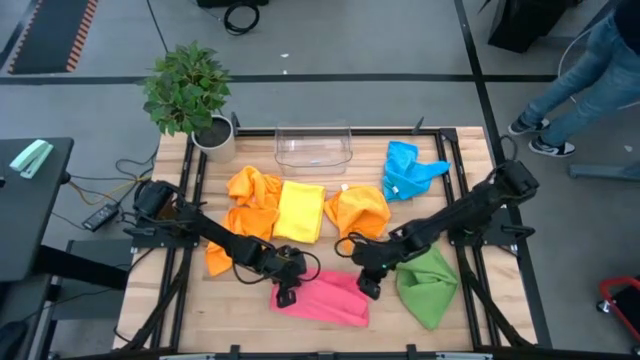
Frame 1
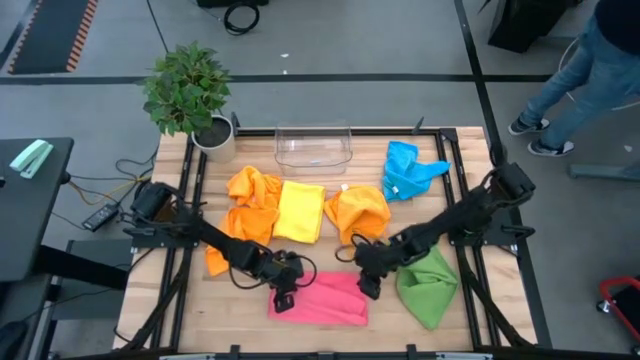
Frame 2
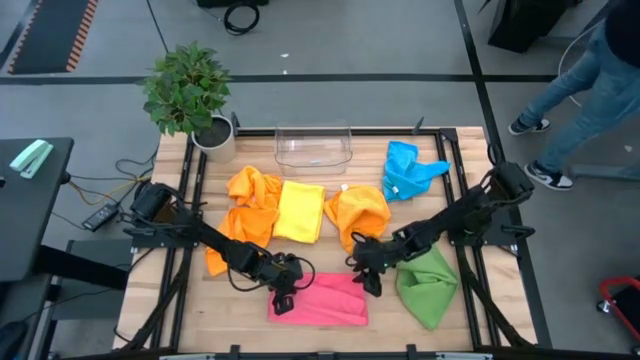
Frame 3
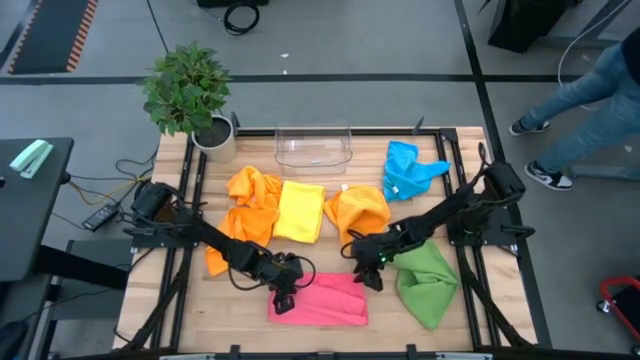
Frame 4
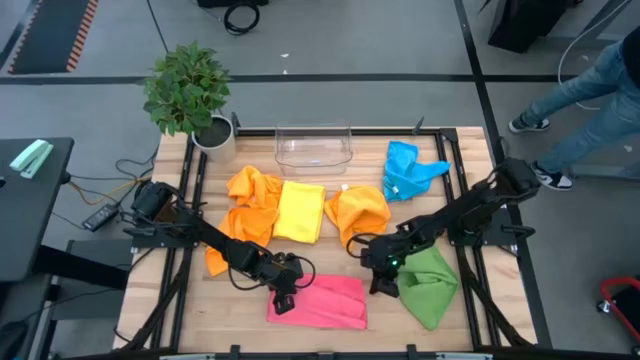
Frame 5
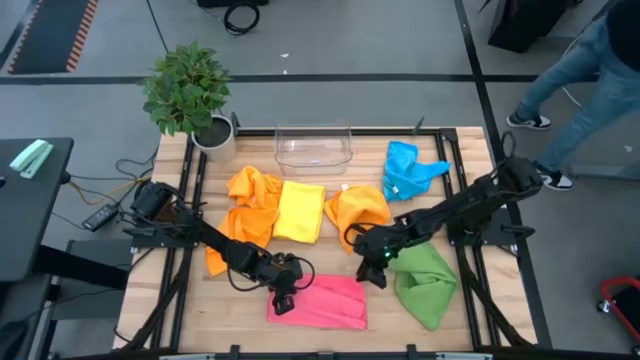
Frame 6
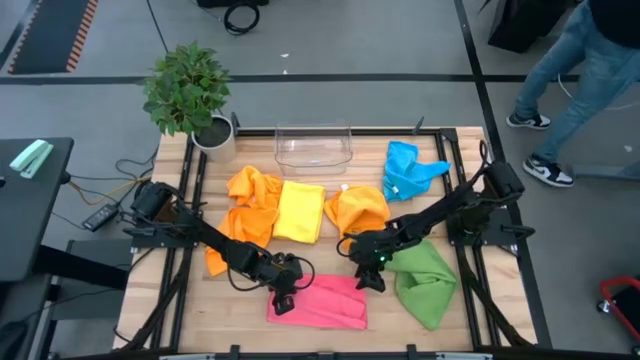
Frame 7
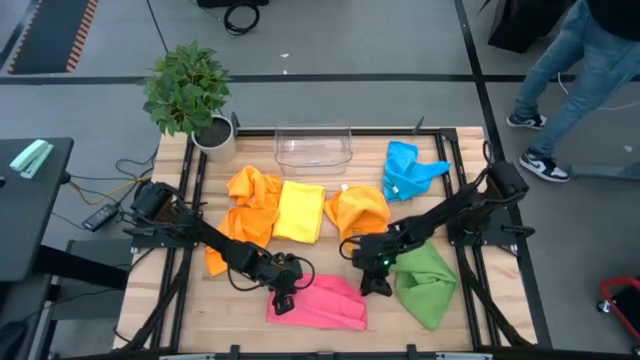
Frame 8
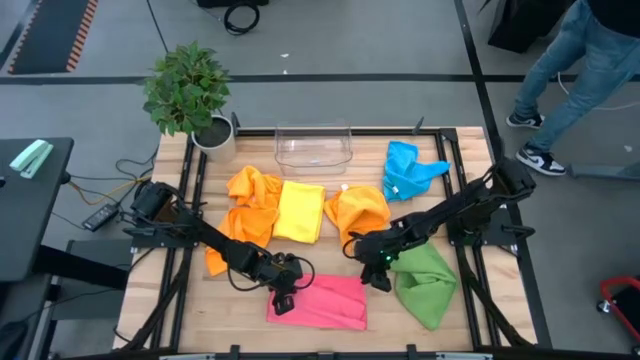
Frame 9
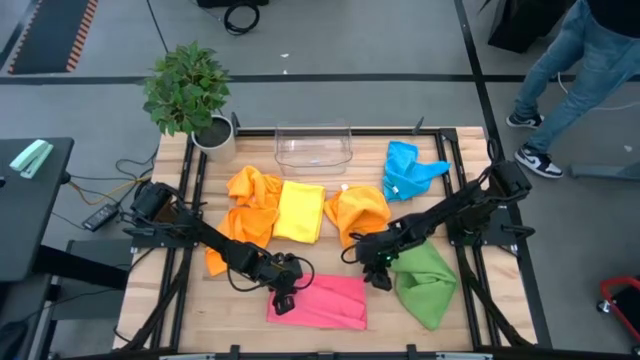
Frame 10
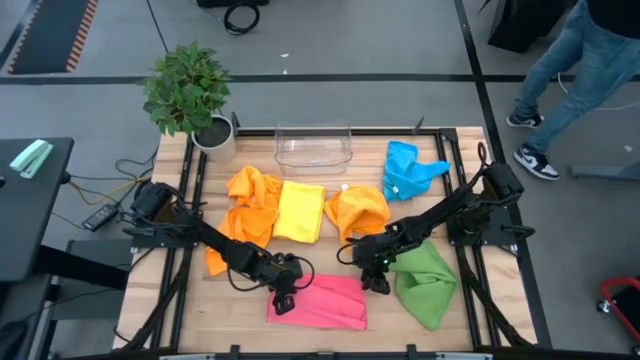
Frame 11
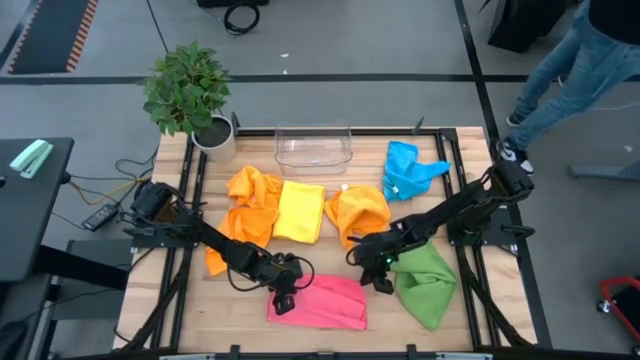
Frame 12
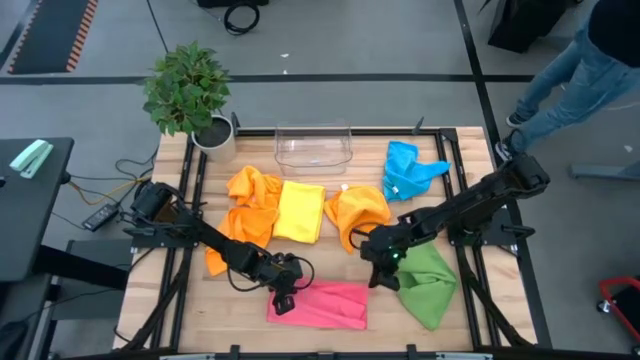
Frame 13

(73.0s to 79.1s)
Task: Fold microfiber towels
Fold the pink microfiber cloth

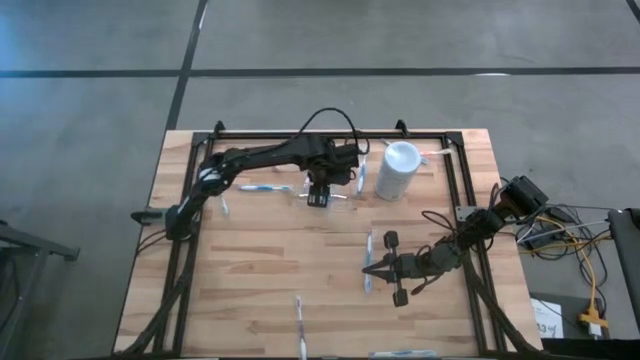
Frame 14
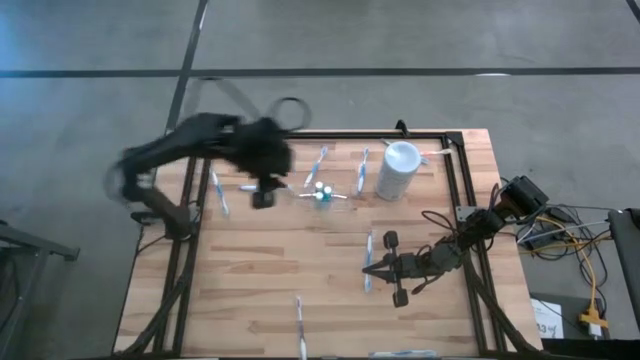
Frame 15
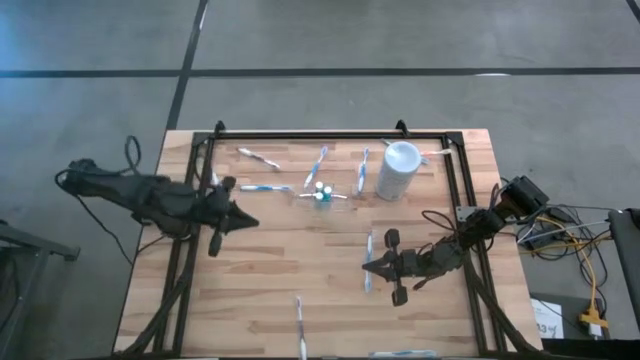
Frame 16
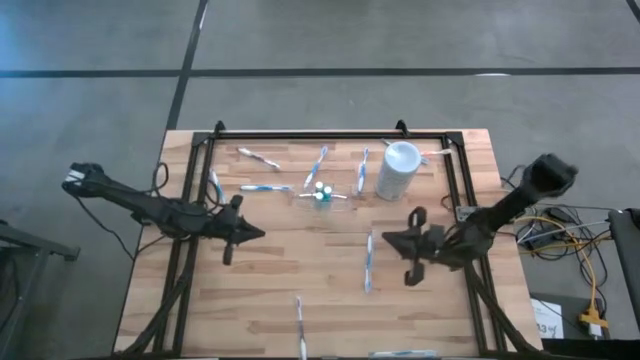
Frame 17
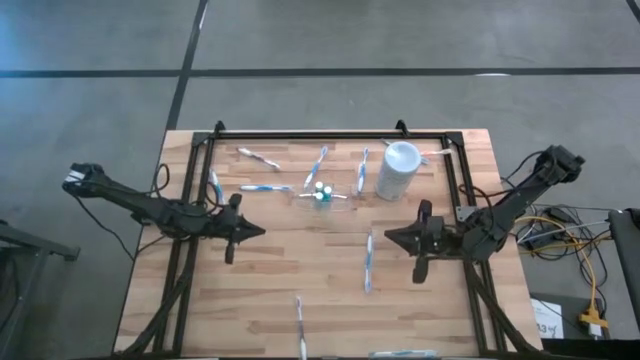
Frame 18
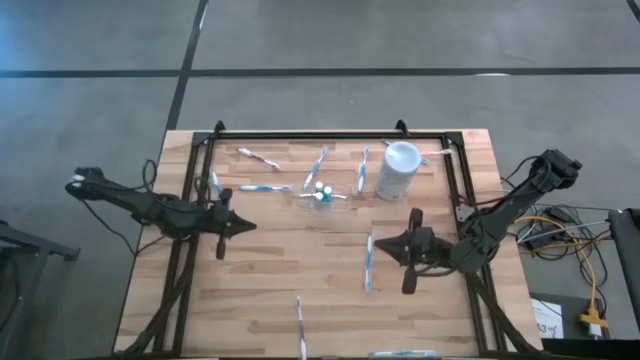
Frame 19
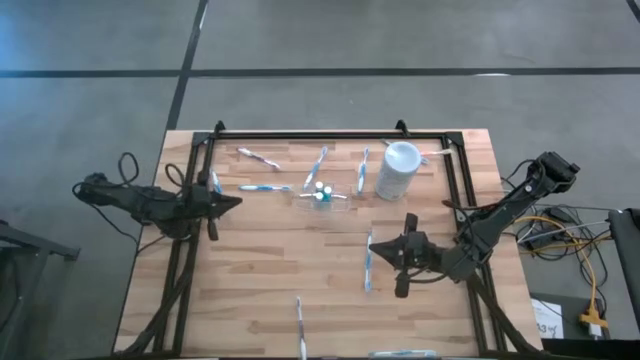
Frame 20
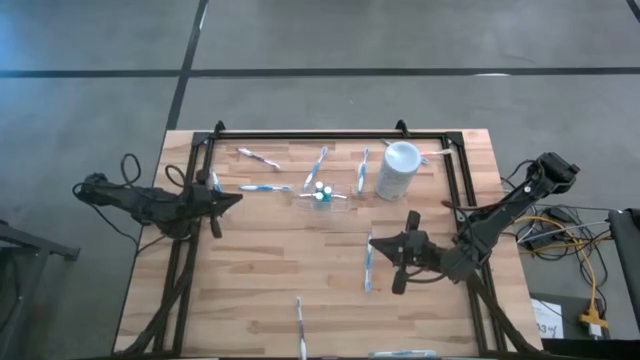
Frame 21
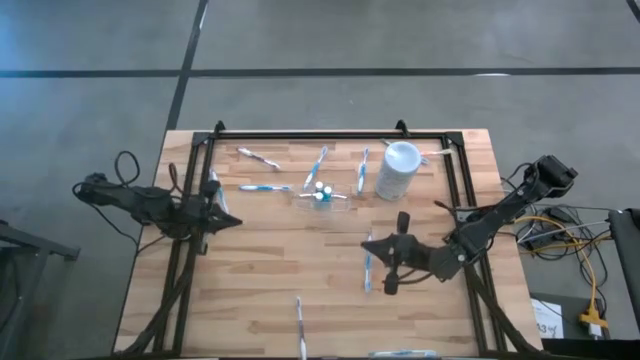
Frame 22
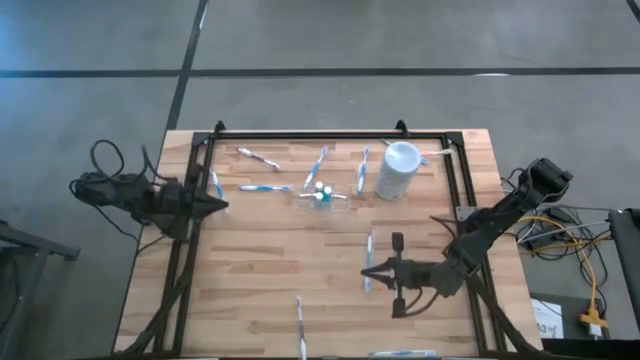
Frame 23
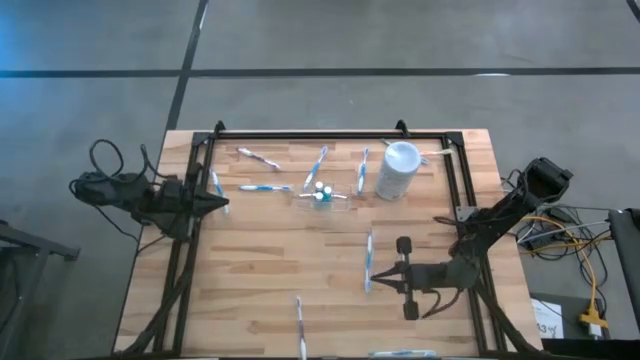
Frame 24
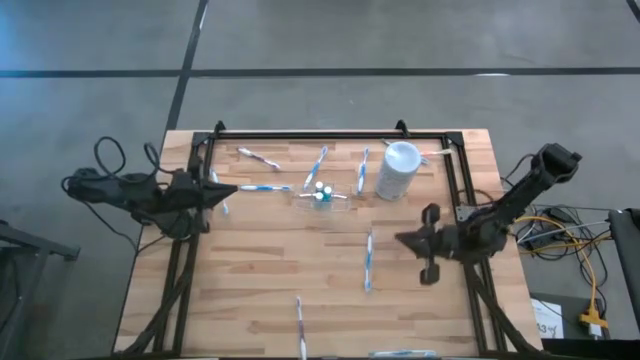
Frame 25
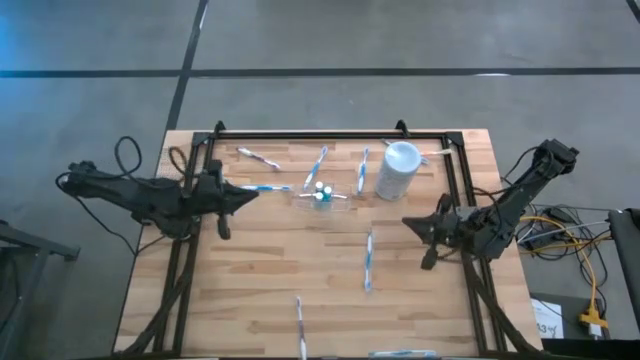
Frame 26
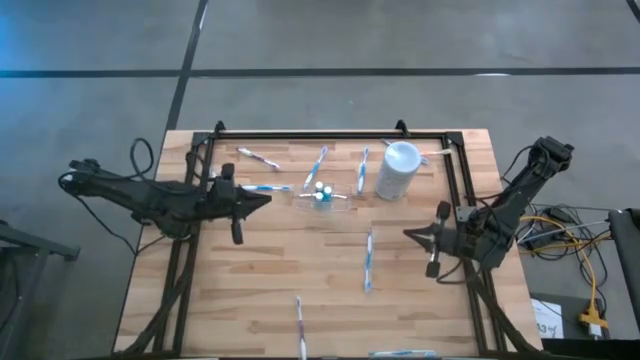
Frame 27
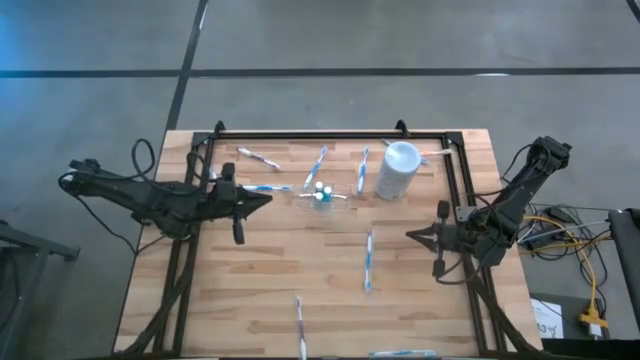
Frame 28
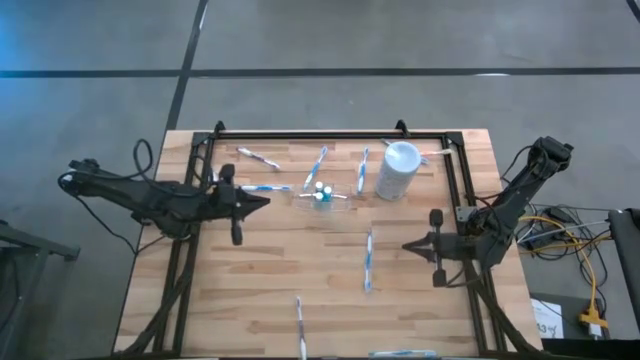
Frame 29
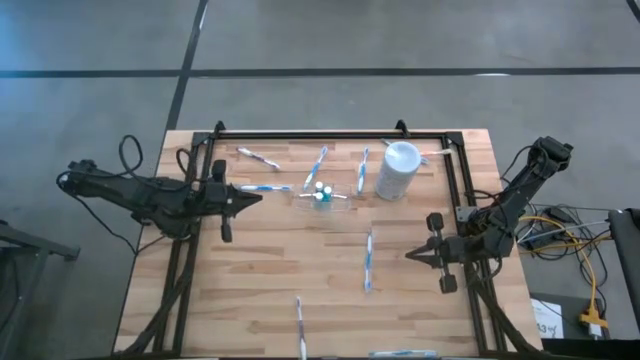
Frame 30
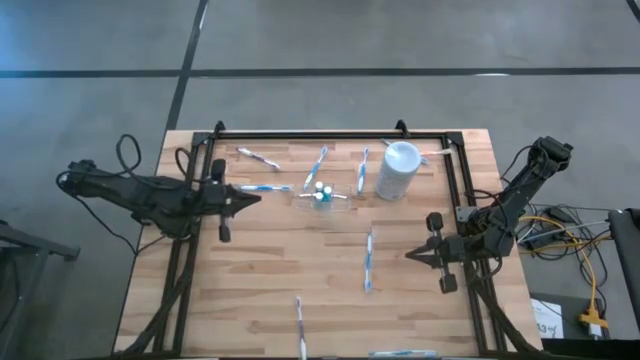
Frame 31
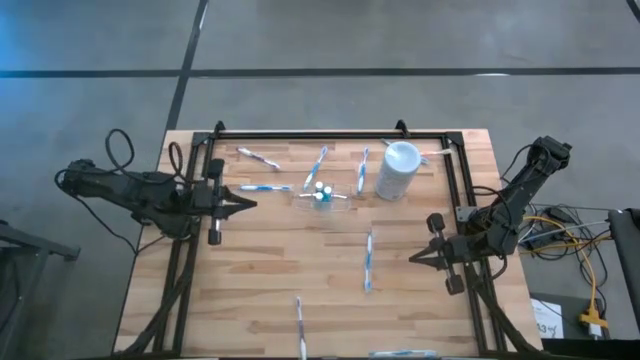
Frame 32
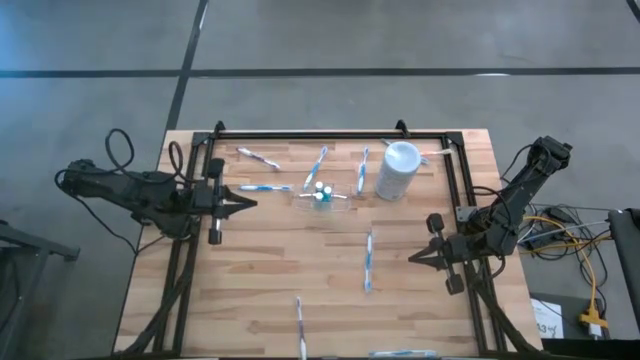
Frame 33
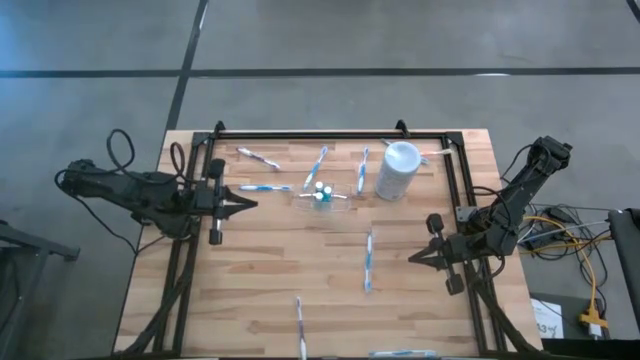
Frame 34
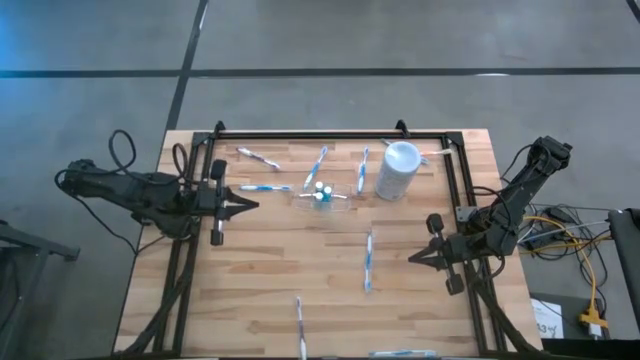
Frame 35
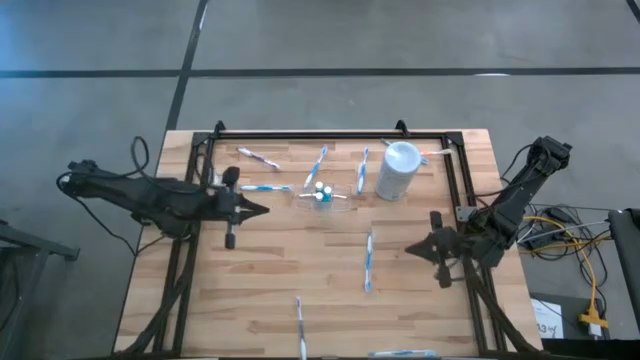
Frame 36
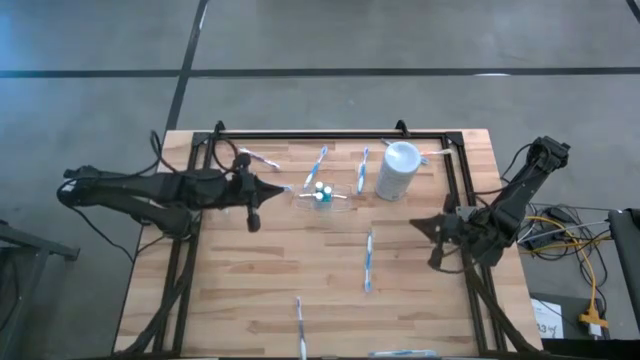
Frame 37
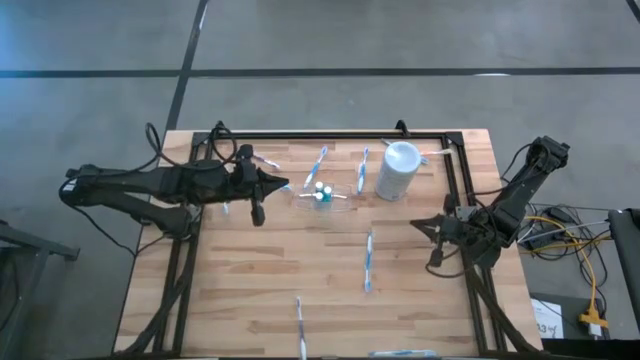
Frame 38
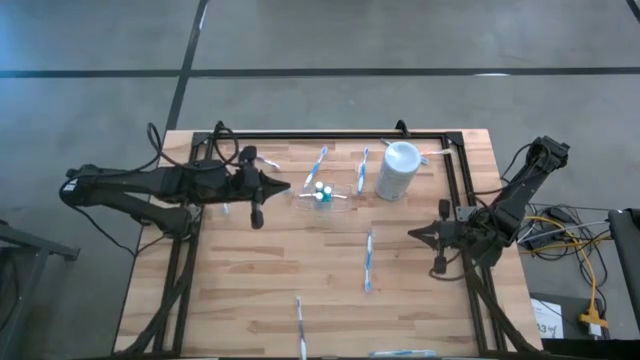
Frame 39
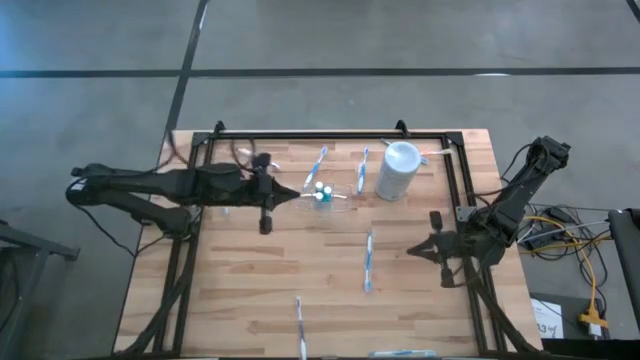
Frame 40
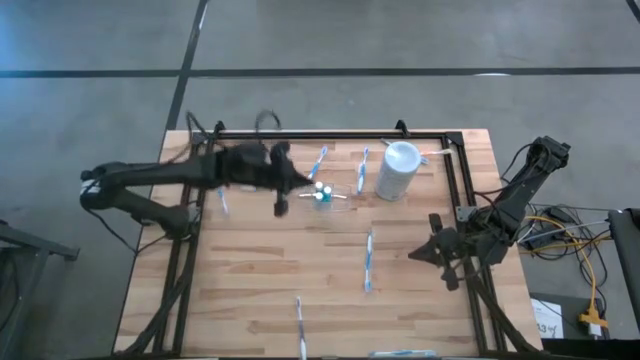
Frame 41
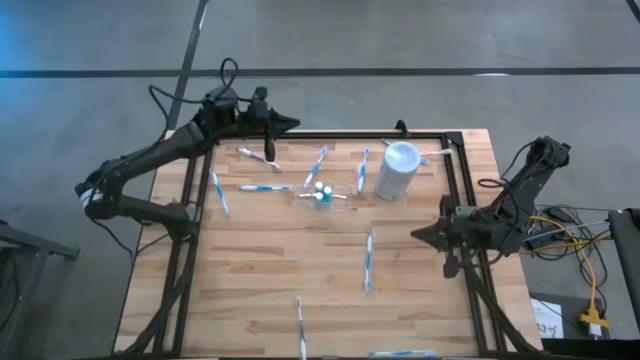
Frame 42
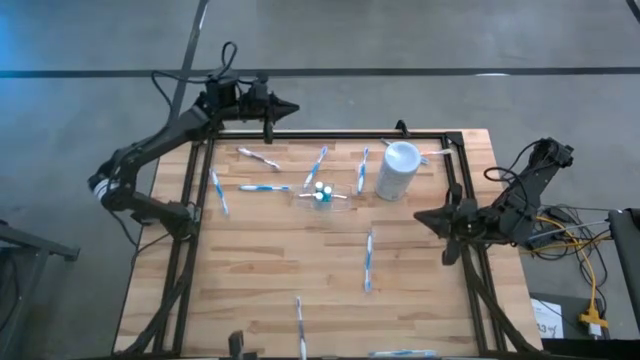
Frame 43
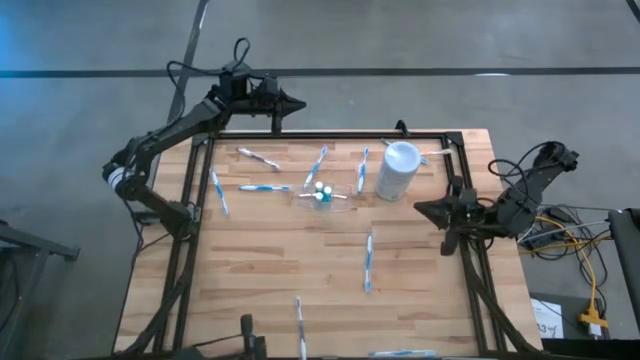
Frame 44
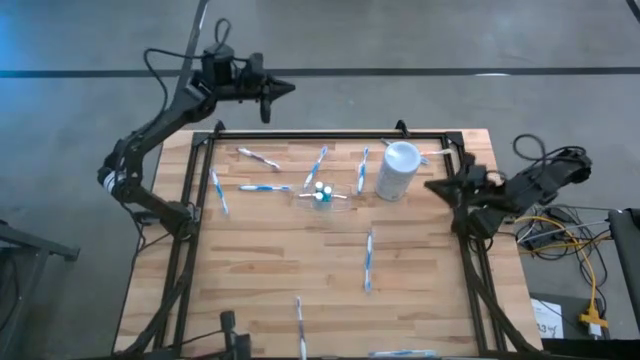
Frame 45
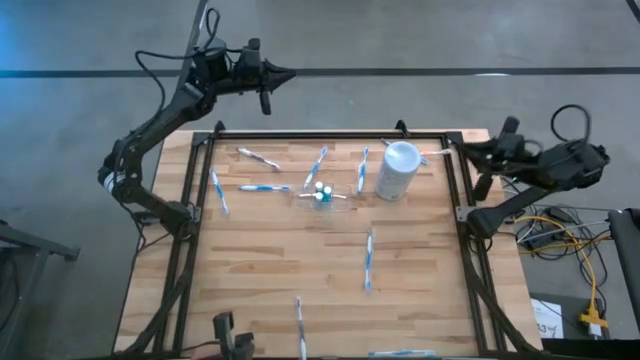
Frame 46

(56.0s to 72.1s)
Task: Pick & Place toothbrushing station
Put the mouthwash into the transparent organizer
